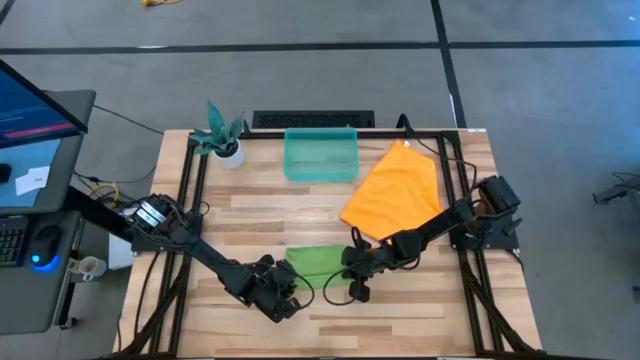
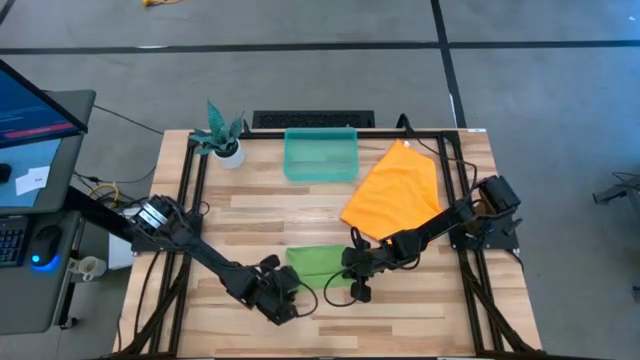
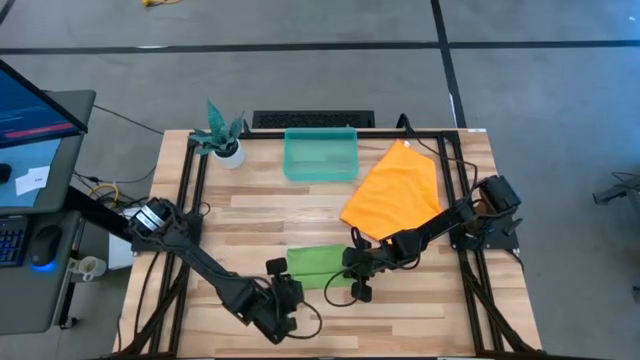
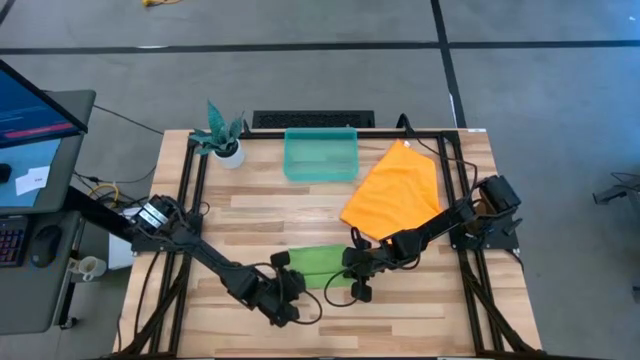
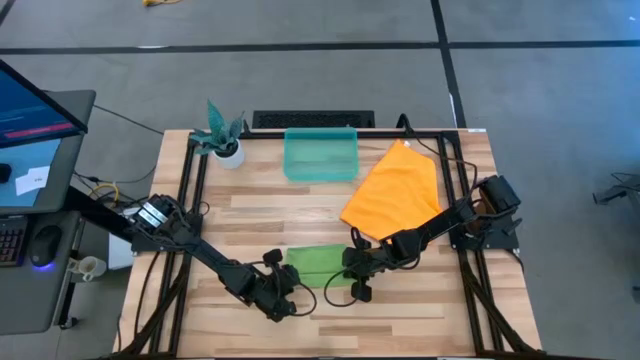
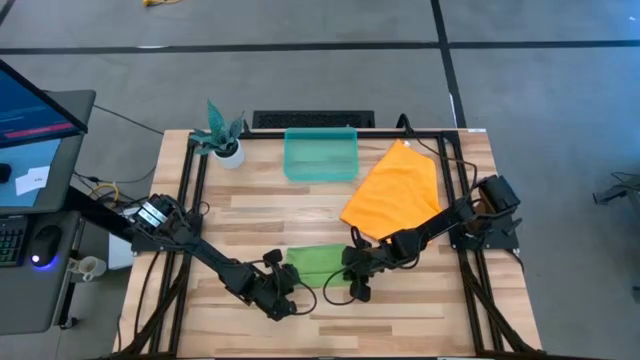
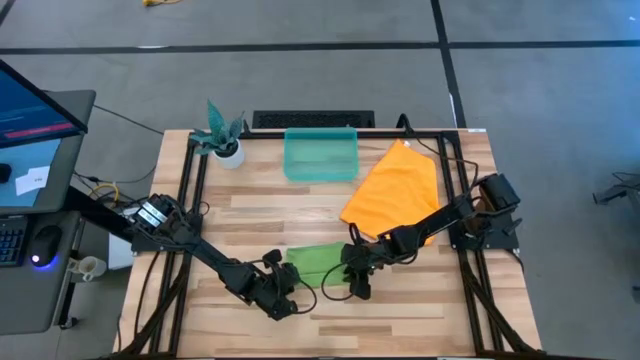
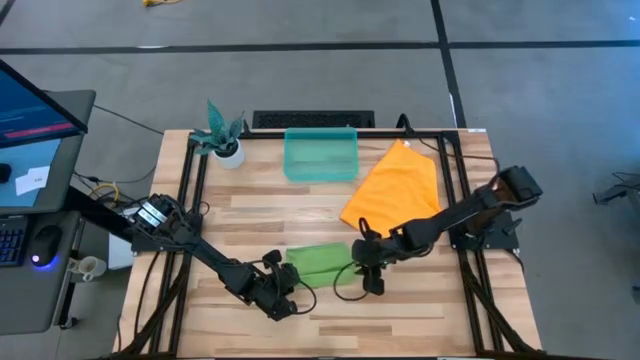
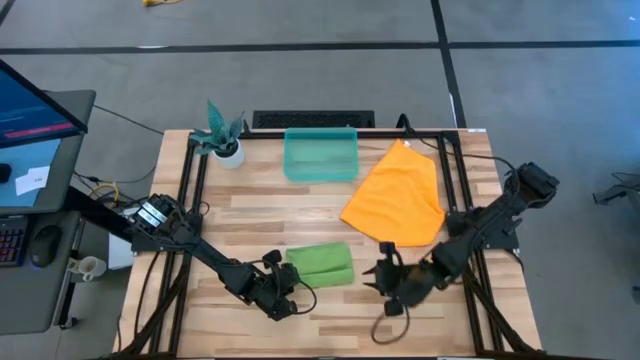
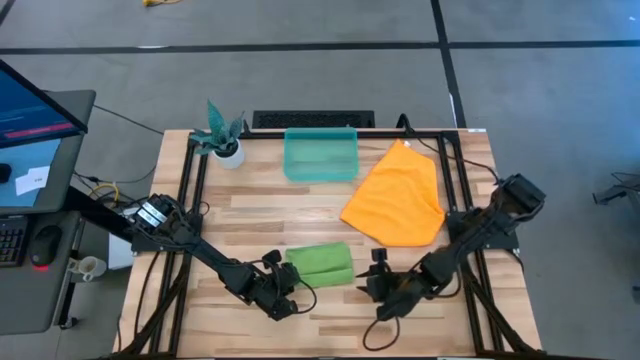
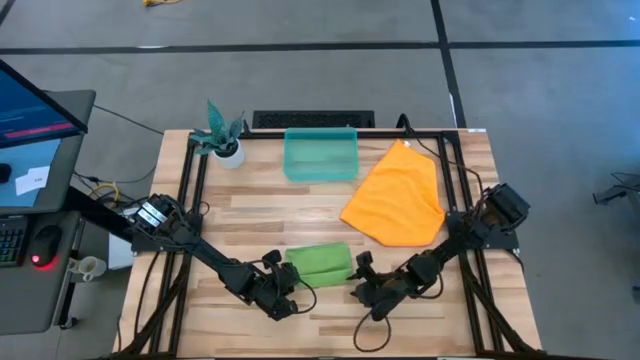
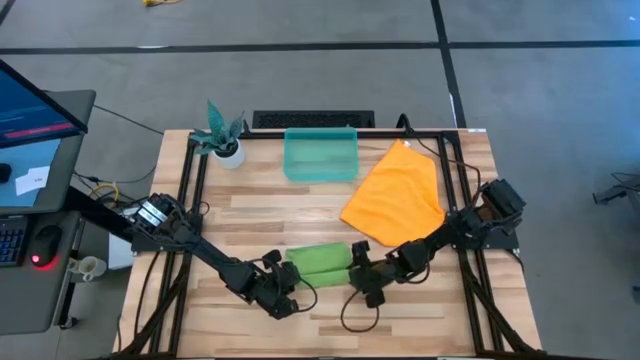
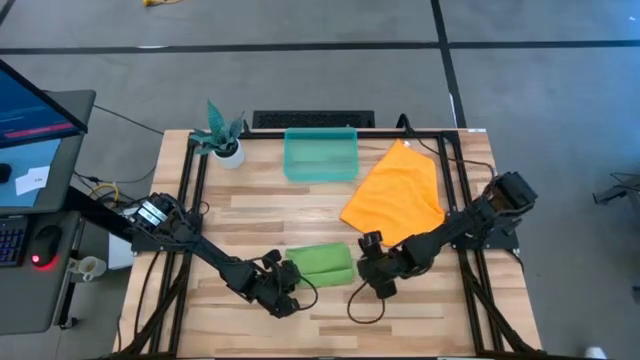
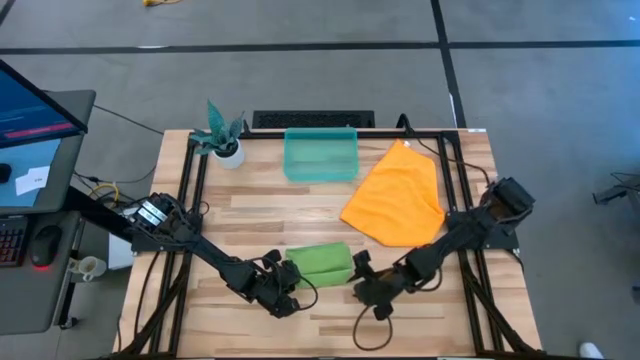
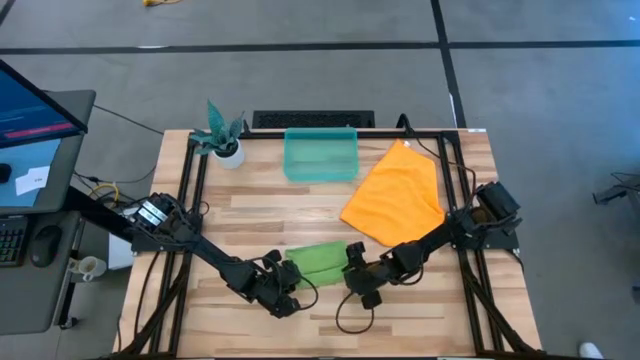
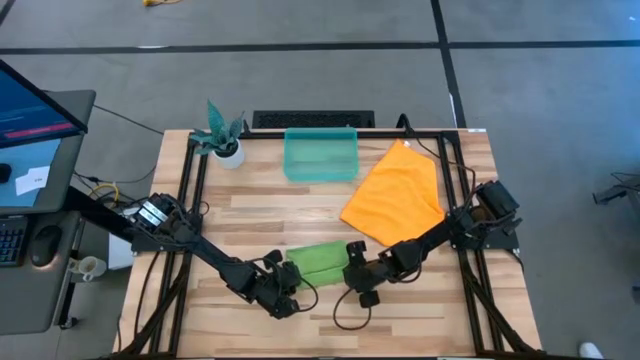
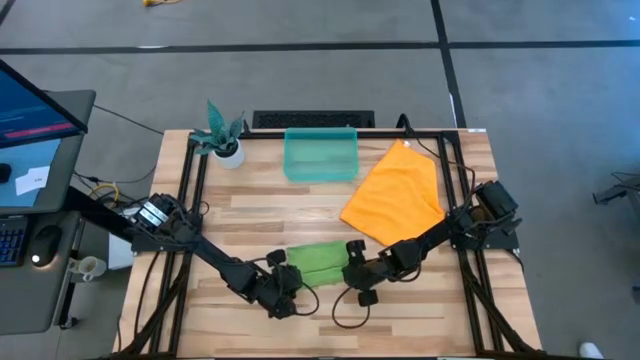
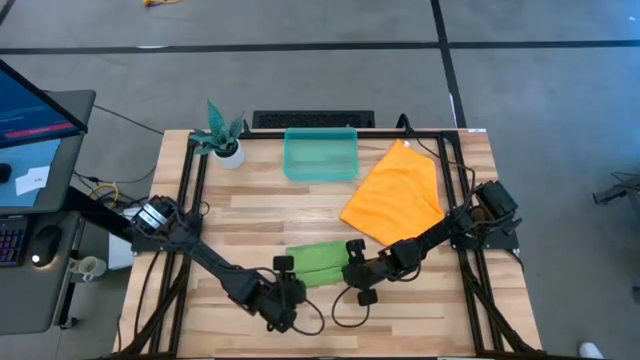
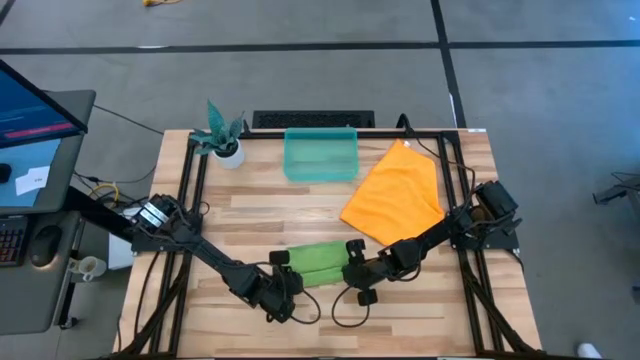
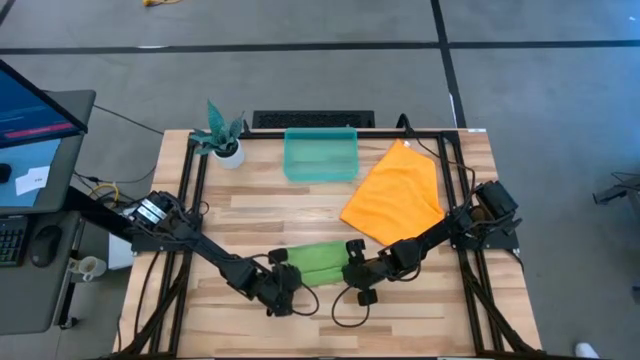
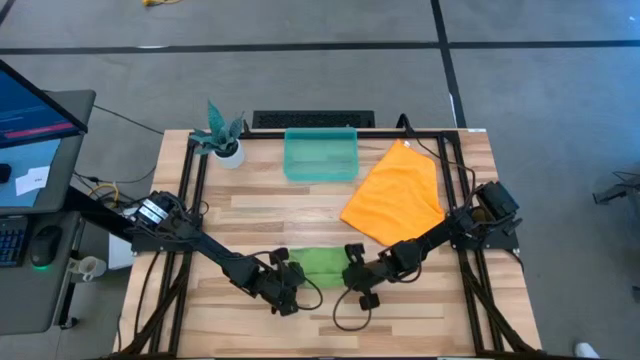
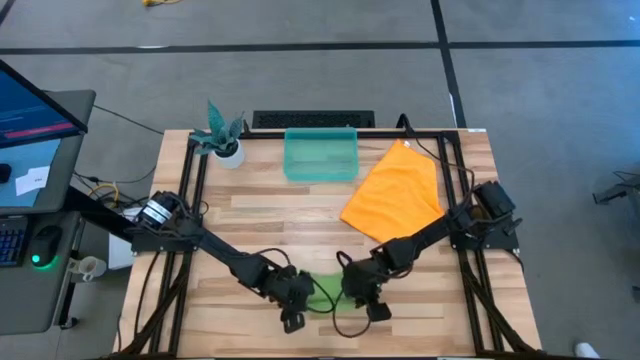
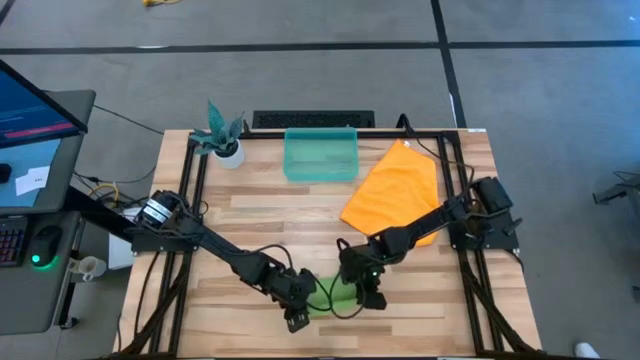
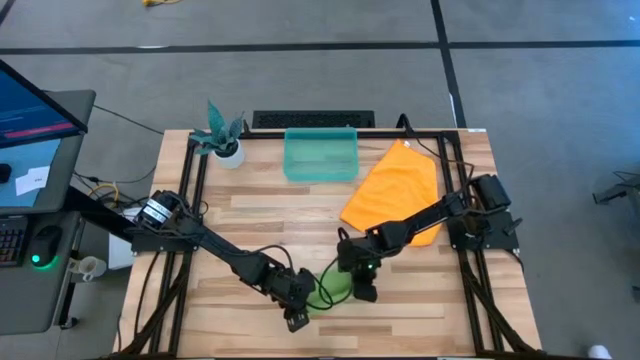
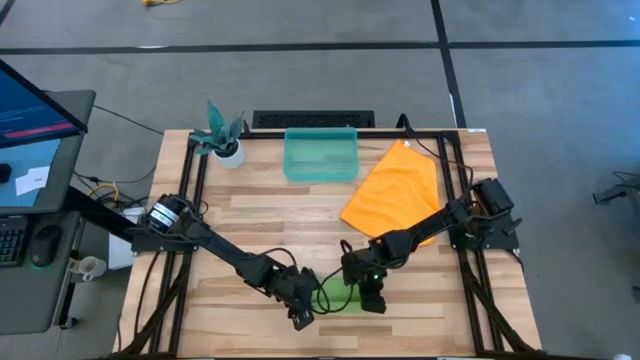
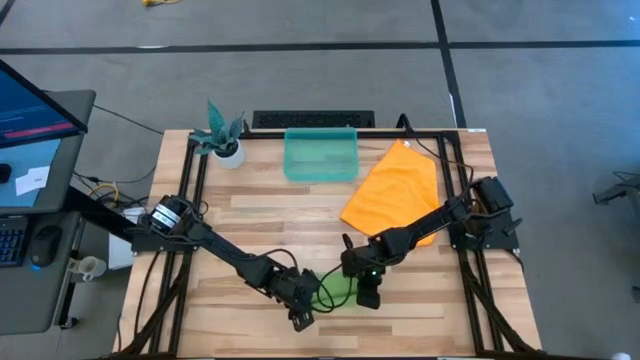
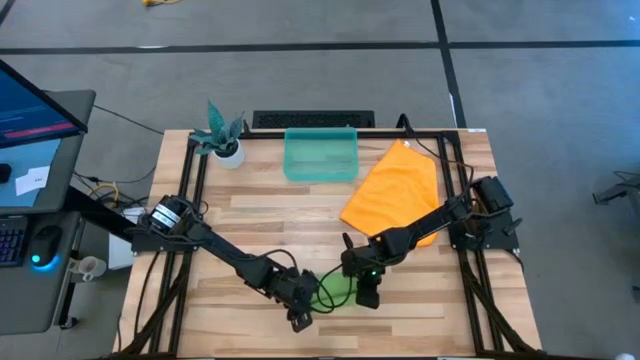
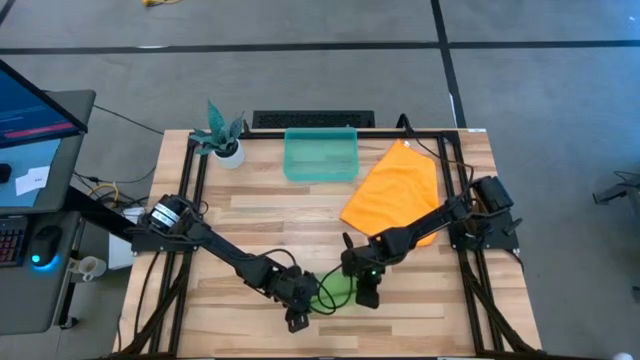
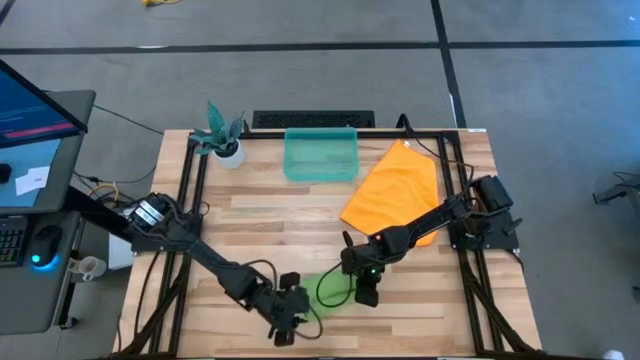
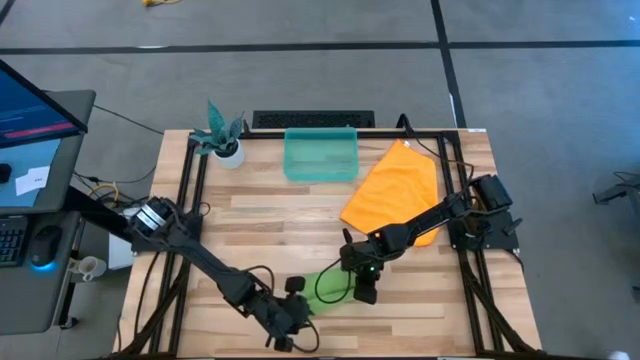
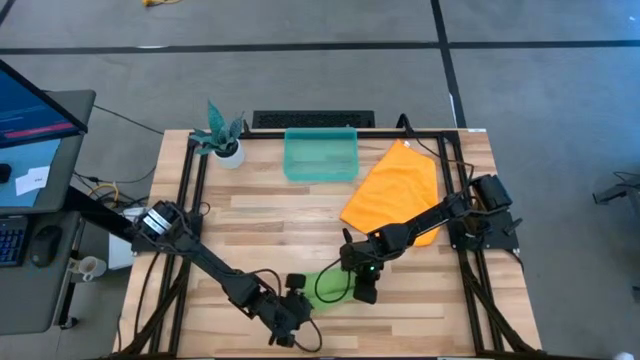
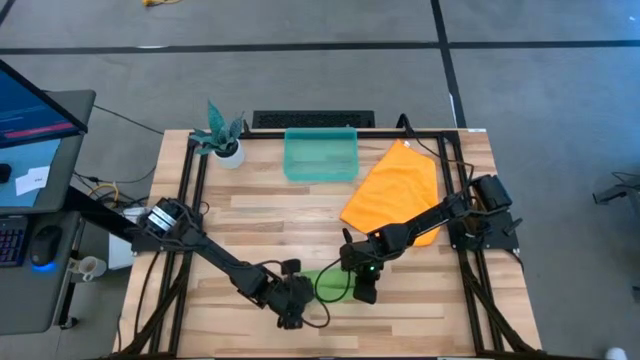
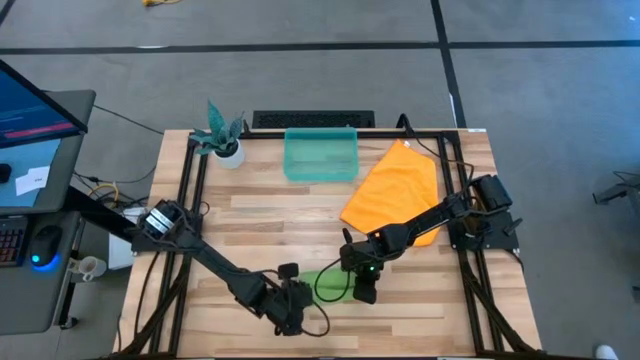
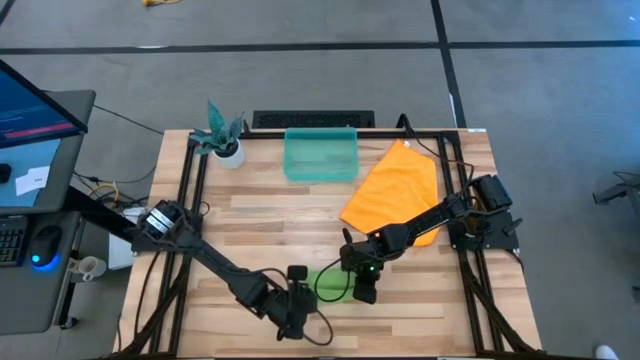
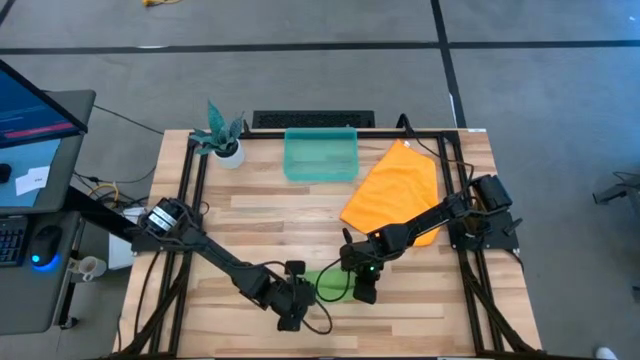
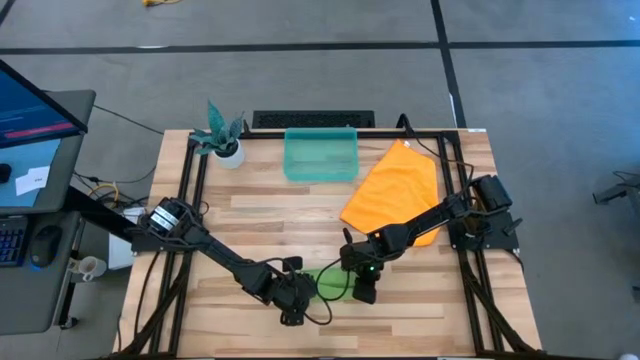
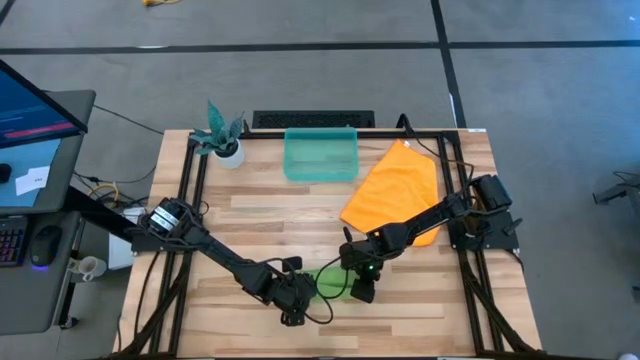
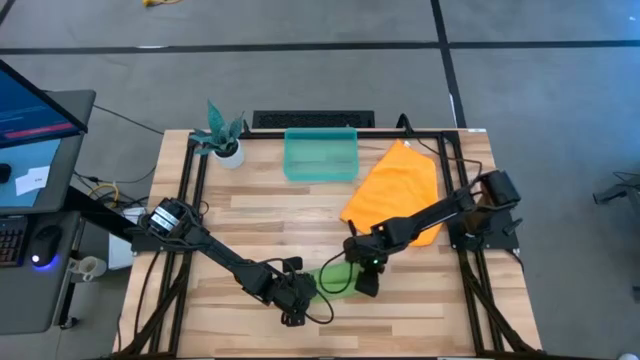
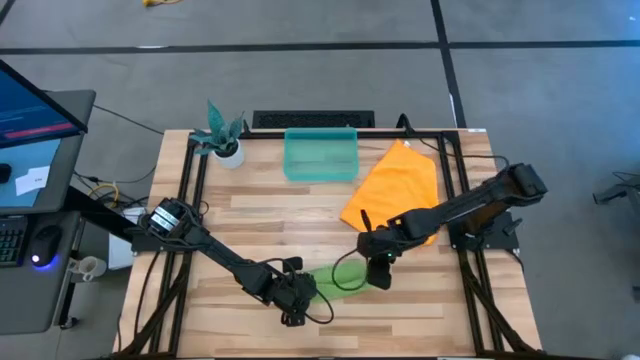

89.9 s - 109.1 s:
Task: Roll microfiber towels into tight, uniform cylinder then place into a basket
Roll the green towel
